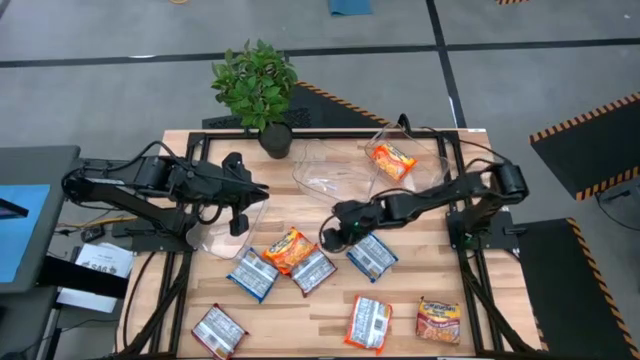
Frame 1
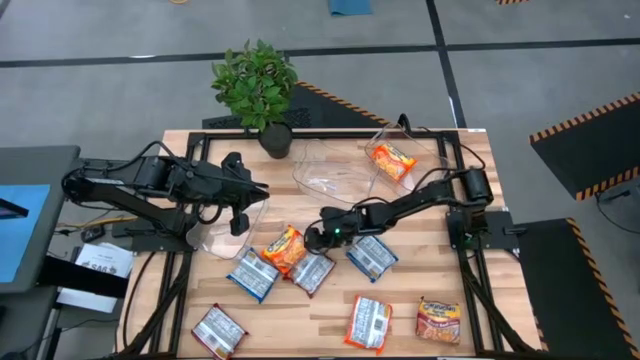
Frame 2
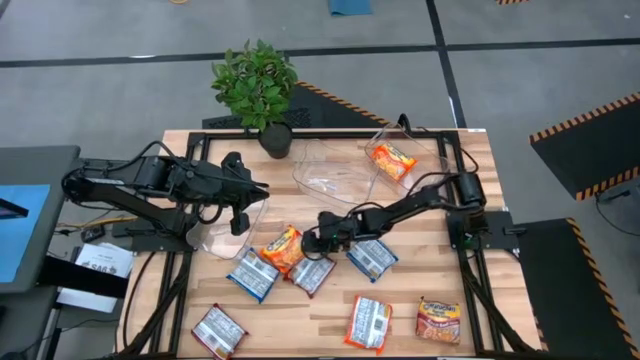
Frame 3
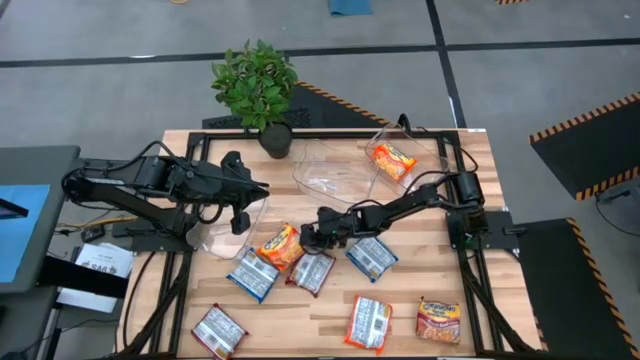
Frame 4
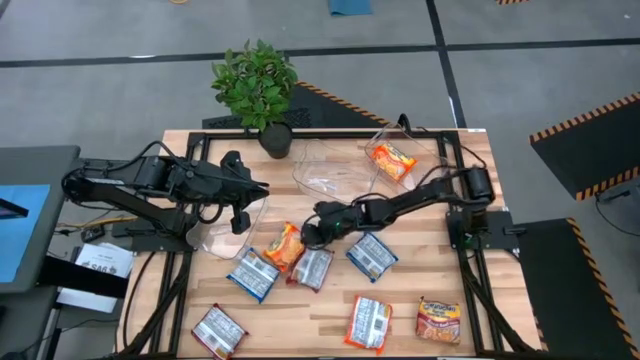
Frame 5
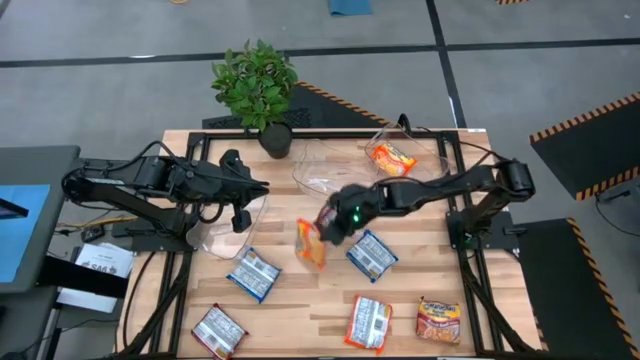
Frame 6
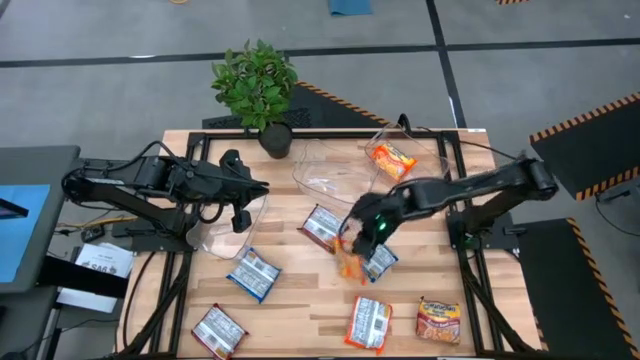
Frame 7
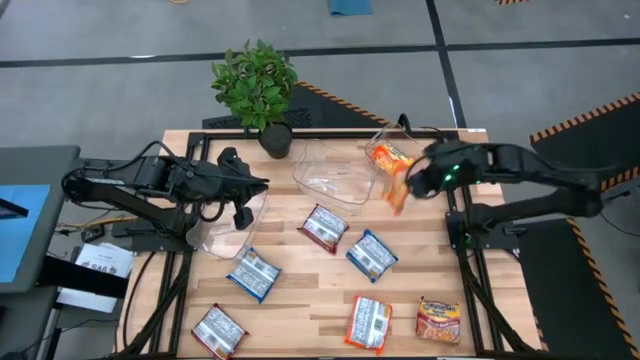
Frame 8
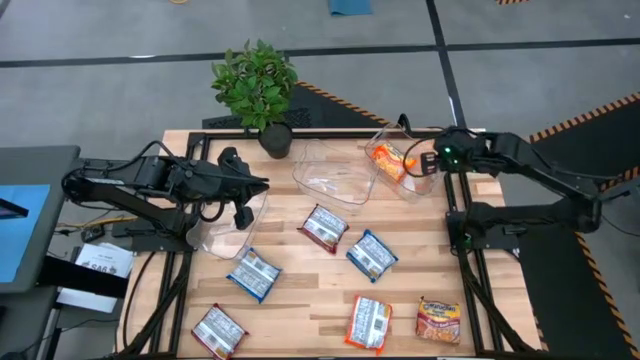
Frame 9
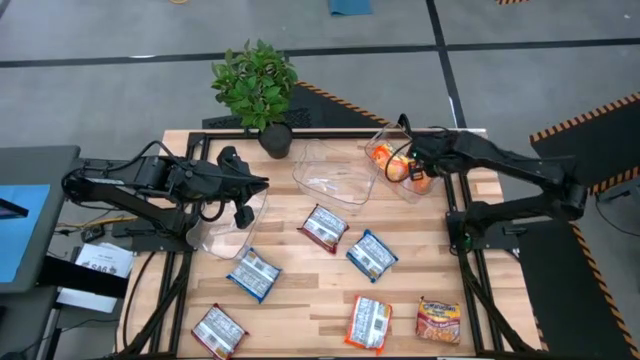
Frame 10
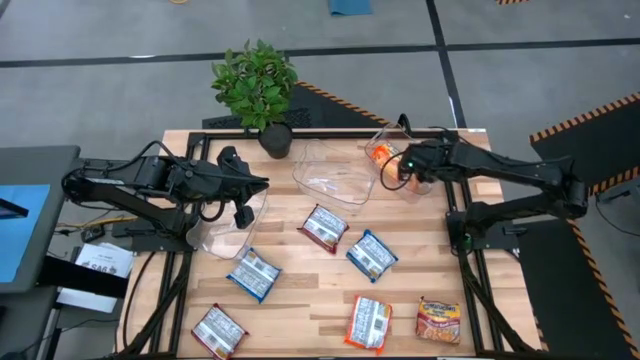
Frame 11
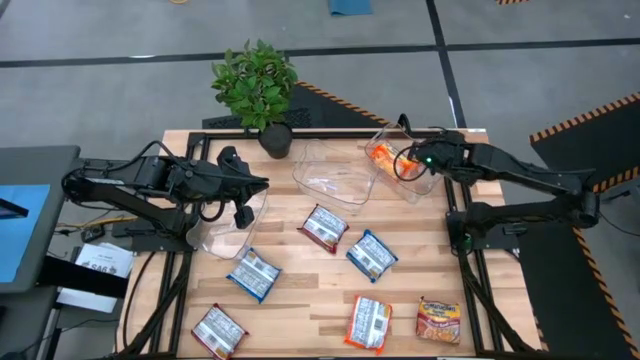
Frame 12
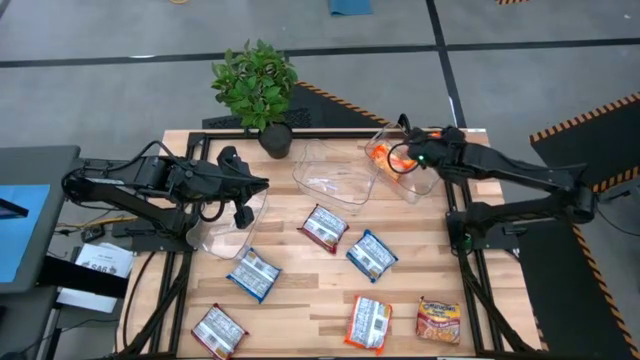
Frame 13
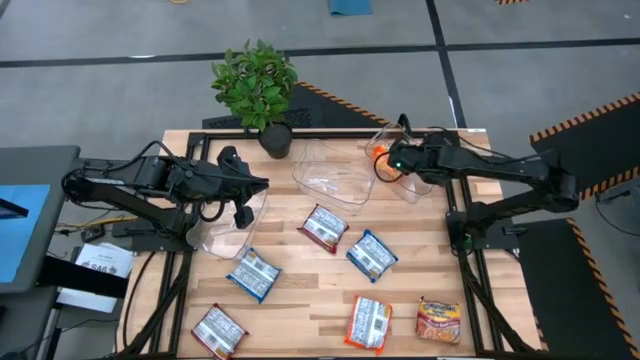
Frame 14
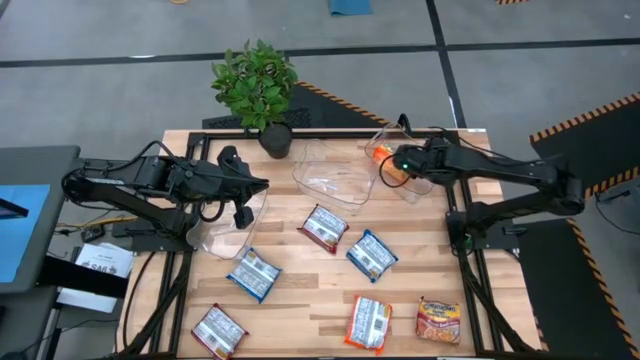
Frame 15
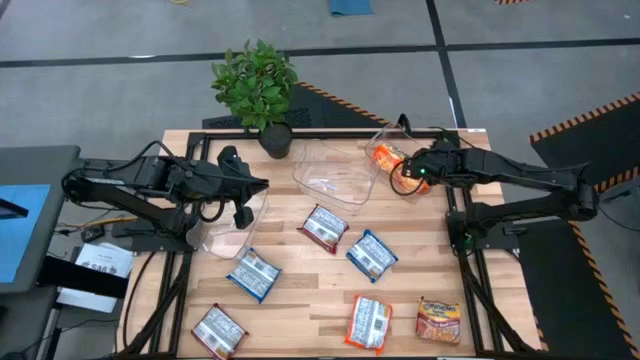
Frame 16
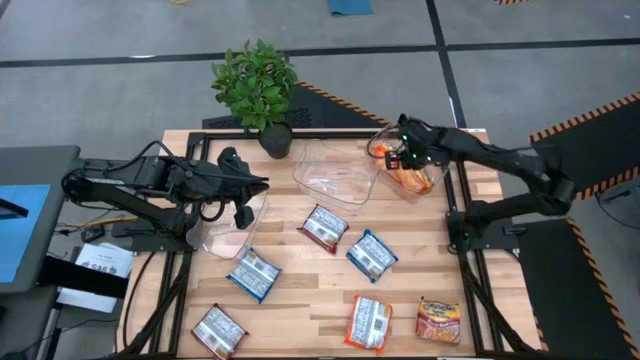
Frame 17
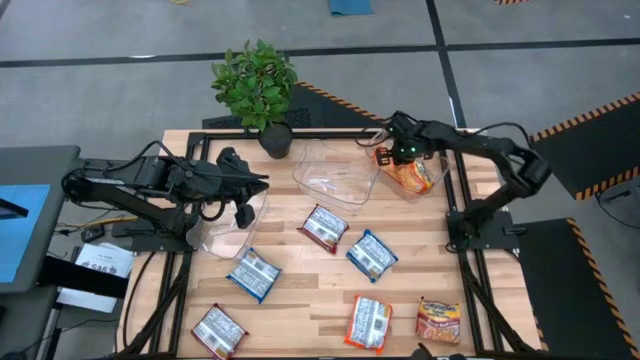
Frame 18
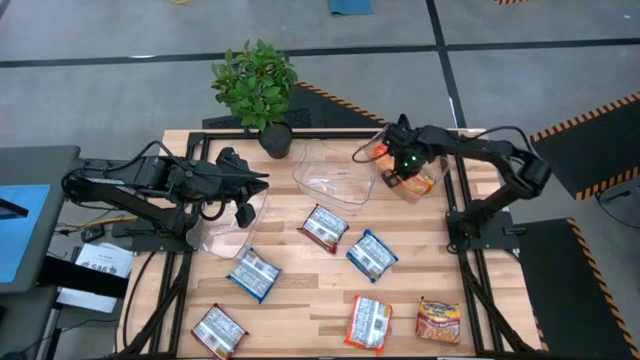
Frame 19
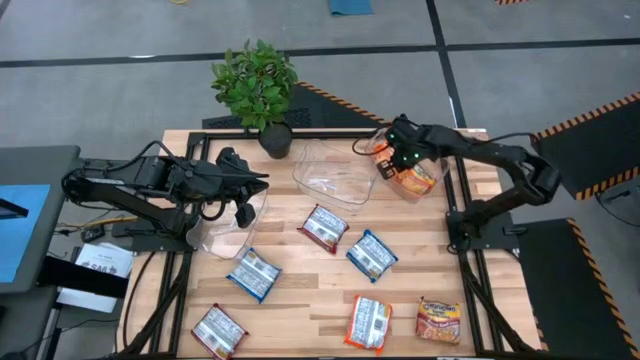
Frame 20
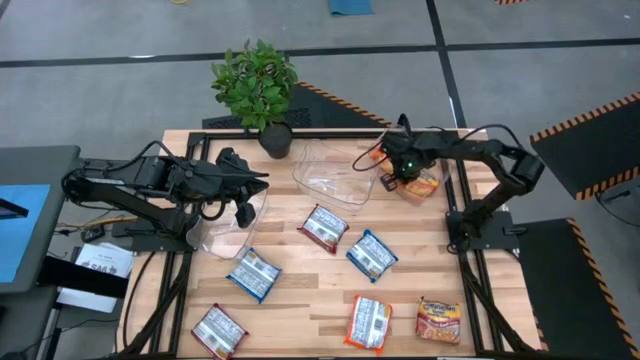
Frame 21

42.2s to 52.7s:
Task: Sort Maruchan noodles
Put the top orange noodle pack into the right transparent bin

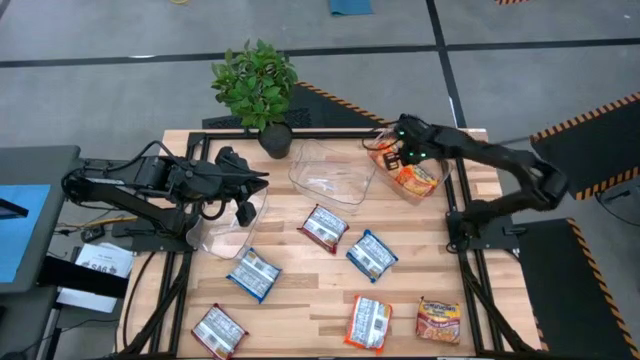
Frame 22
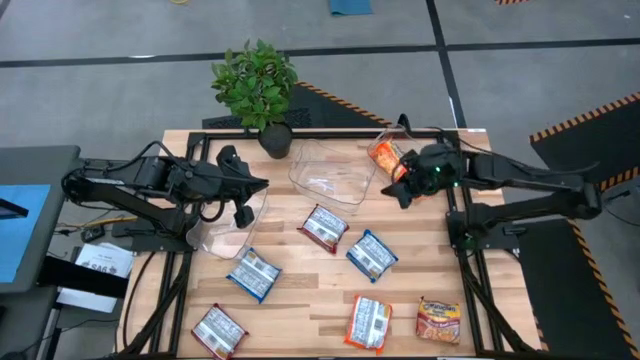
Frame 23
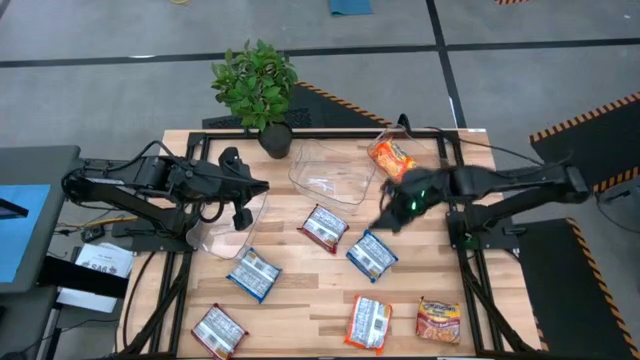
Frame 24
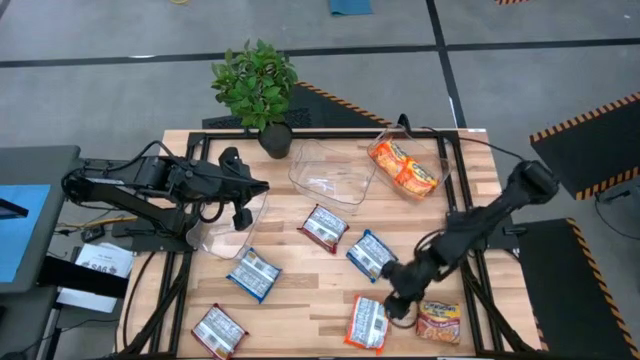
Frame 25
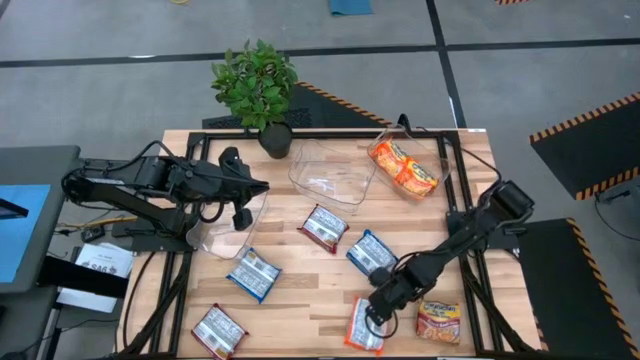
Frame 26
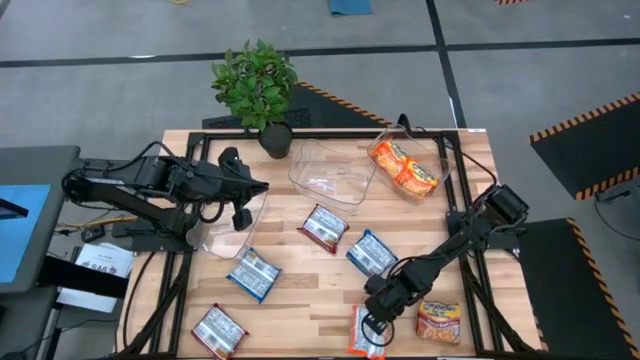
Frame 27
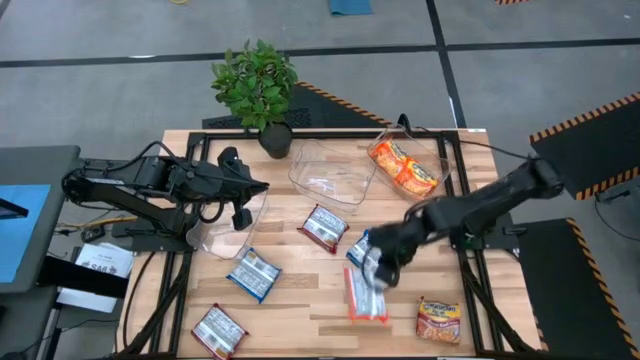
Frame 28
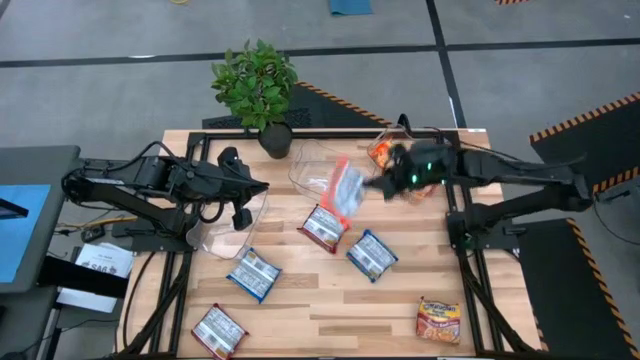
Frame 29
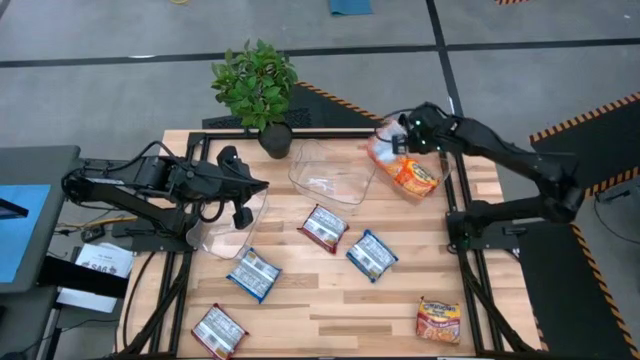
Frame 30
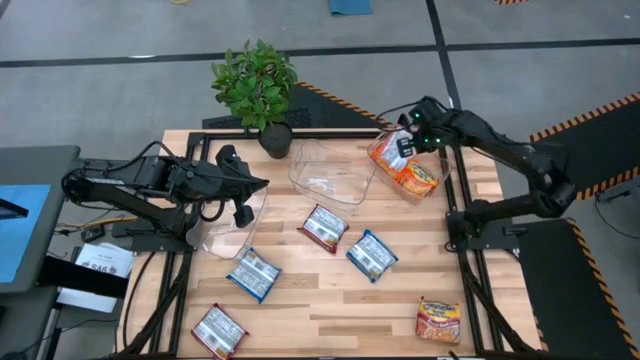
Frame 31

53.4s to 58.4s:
Put the orange noodle pack into the right transparent bin

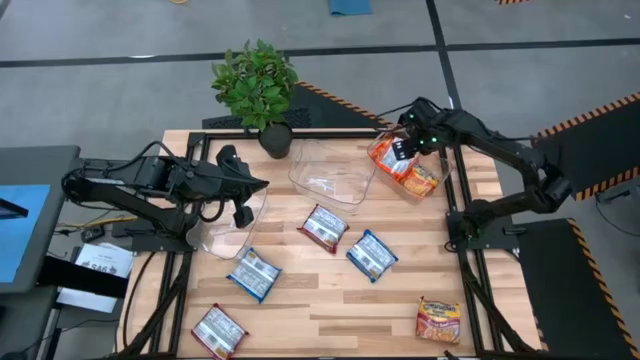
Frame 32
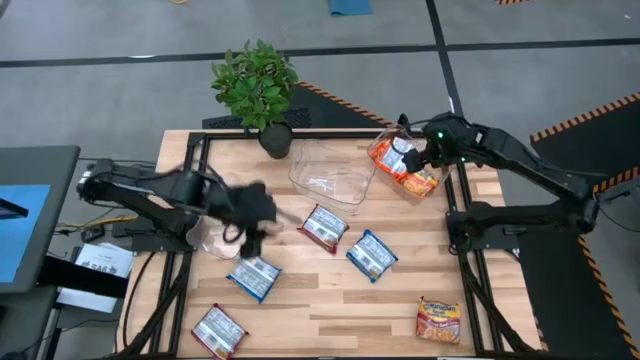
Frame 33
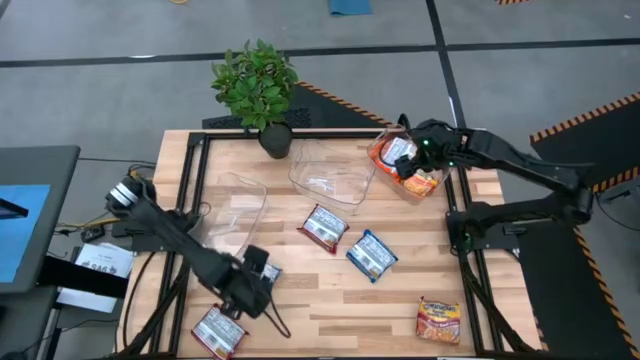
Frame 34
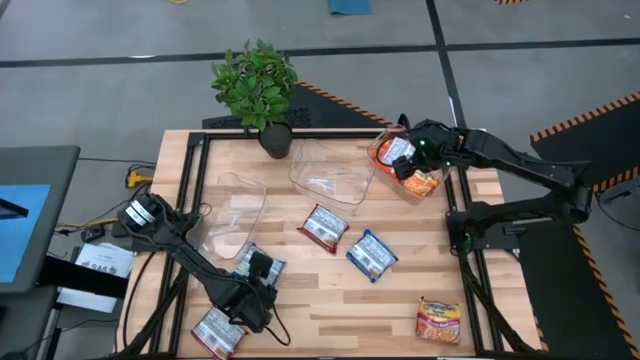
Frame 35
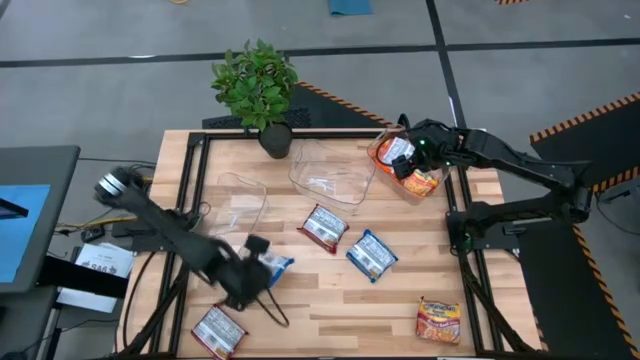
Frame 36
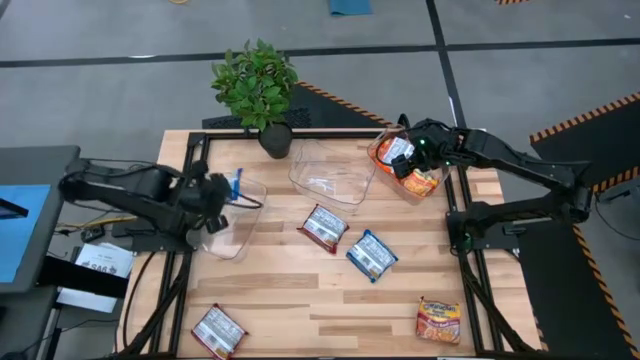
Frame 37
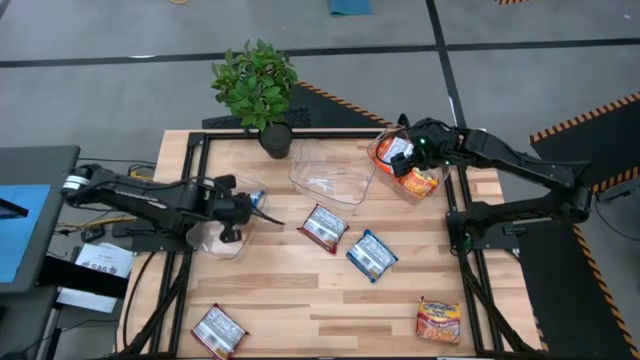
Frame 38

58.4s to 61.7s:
Put the left blue noodle pack into the left transparent bin

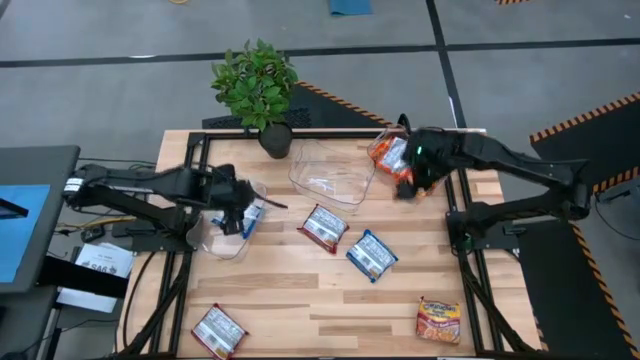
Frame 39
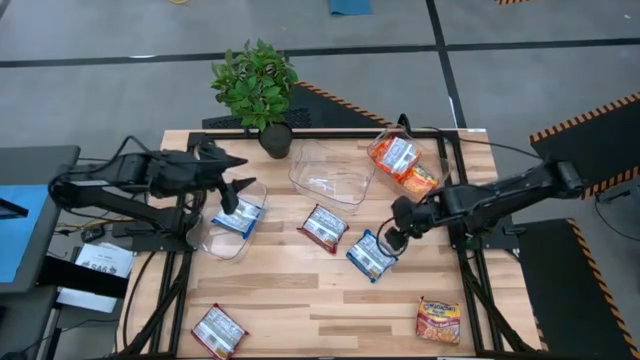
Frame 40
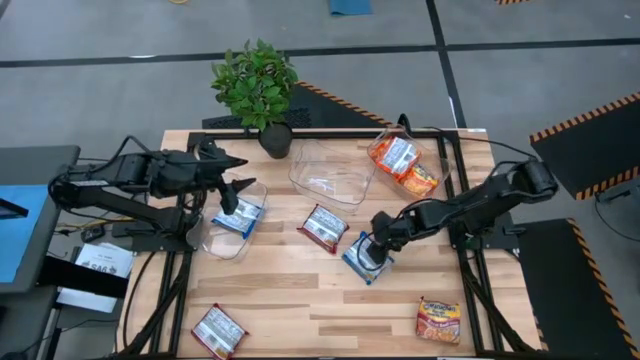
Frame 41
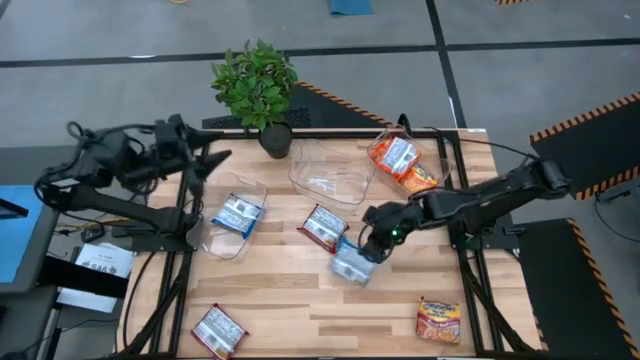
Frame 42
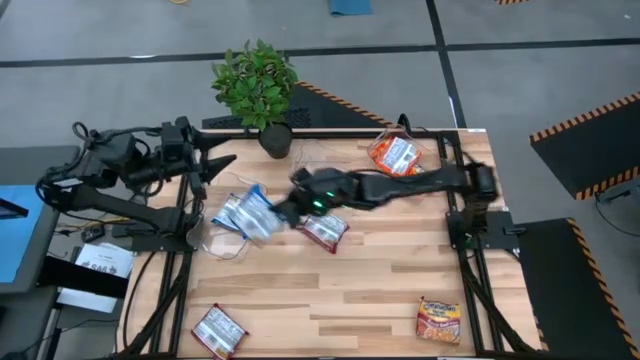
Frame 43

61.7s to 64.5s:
Put the blue noodle pack into the left transparent bin

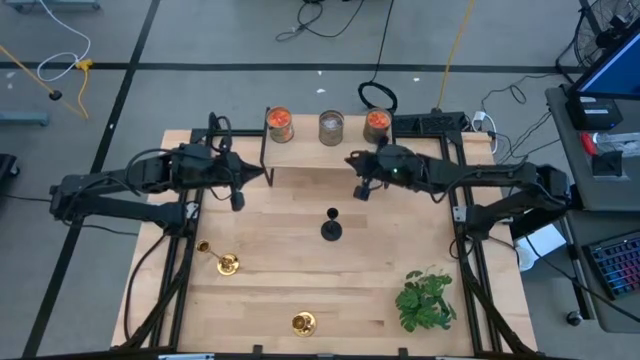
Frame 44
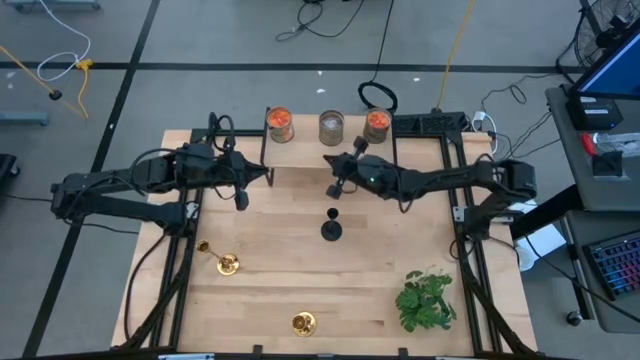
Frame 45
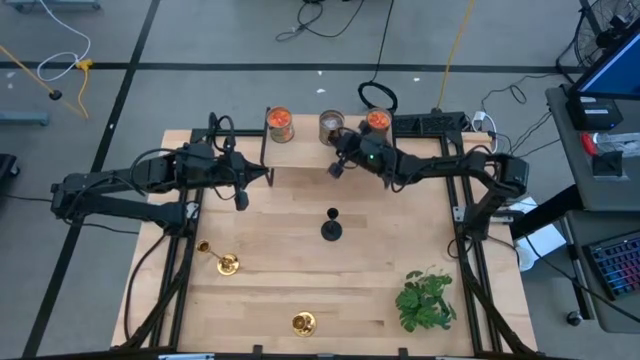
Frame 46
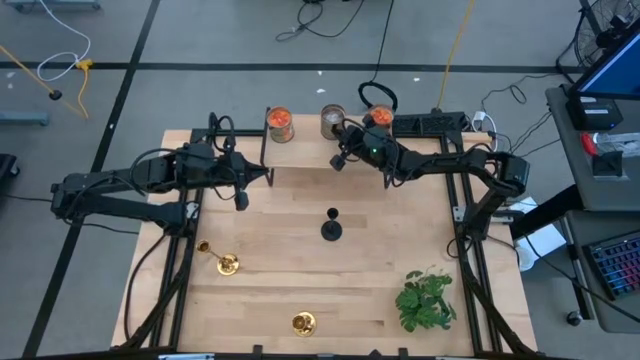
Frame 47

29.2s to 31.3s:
Task: Pick & Place candle stick holders
Adjust the brown scented candle
